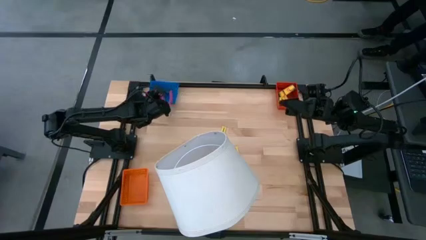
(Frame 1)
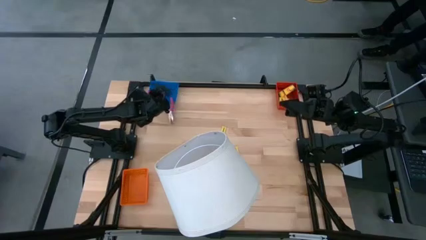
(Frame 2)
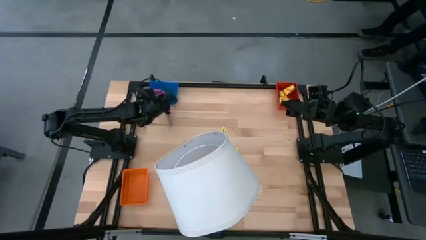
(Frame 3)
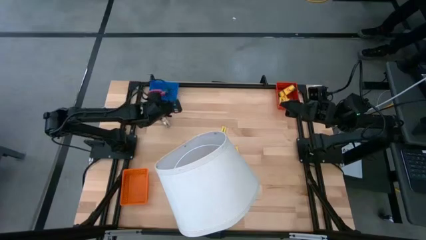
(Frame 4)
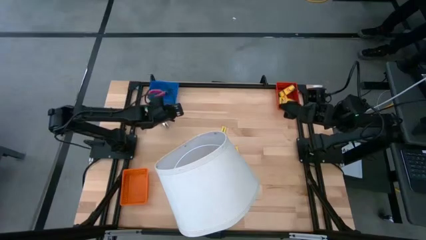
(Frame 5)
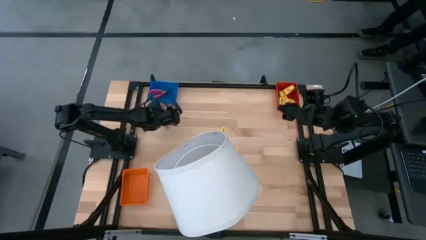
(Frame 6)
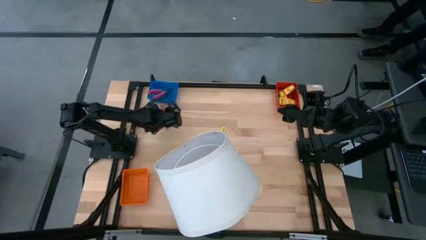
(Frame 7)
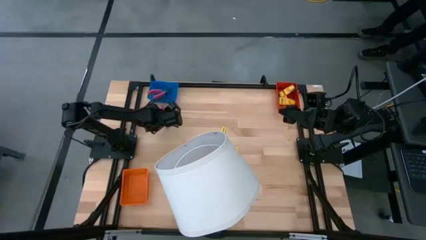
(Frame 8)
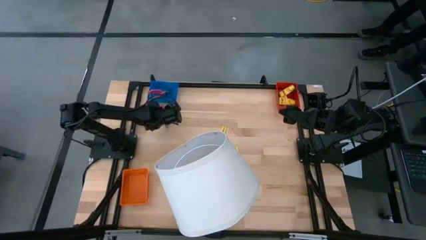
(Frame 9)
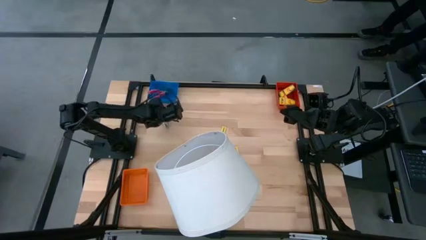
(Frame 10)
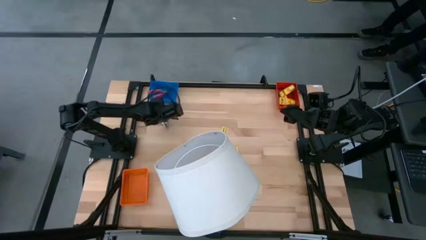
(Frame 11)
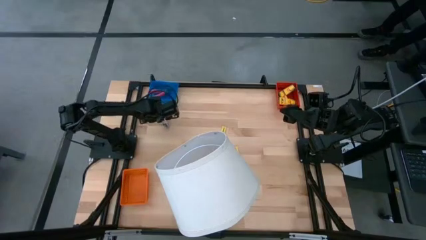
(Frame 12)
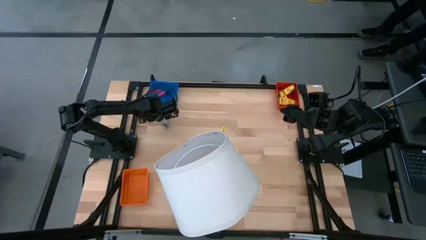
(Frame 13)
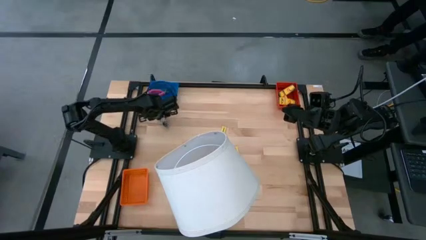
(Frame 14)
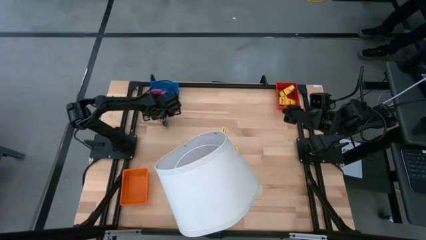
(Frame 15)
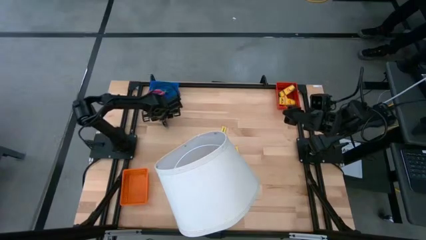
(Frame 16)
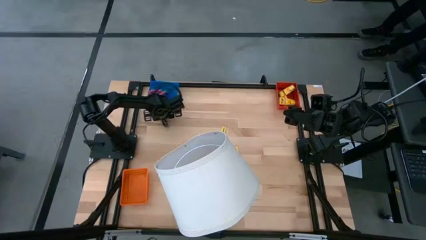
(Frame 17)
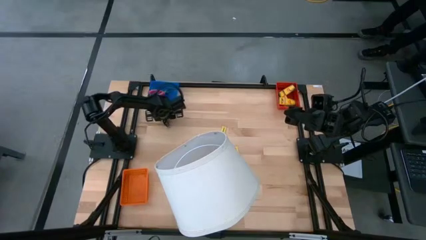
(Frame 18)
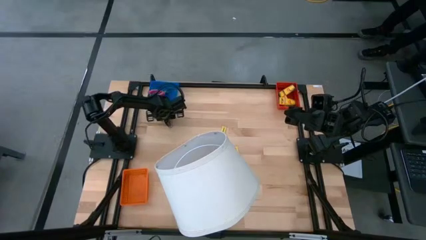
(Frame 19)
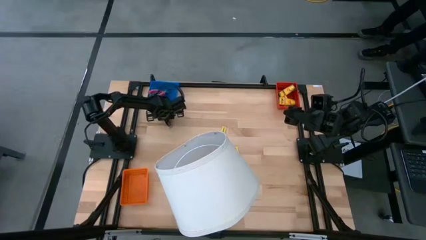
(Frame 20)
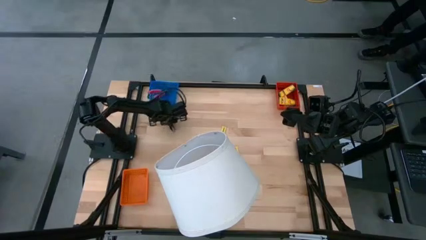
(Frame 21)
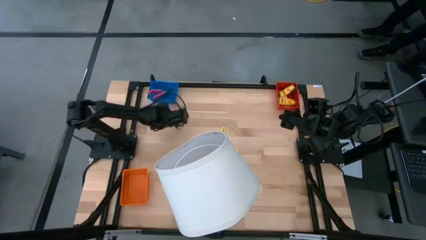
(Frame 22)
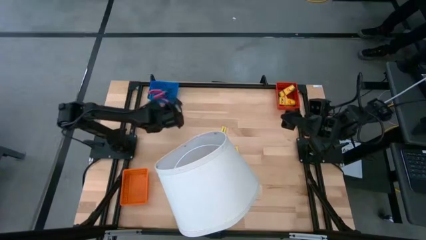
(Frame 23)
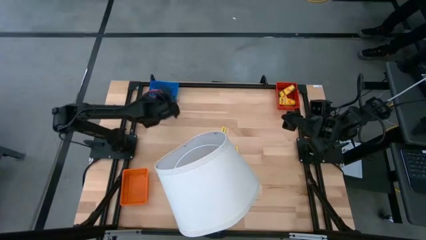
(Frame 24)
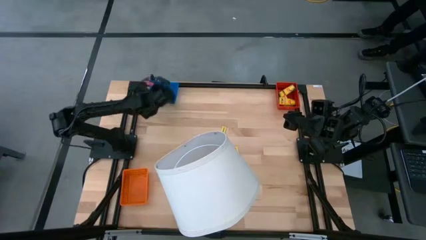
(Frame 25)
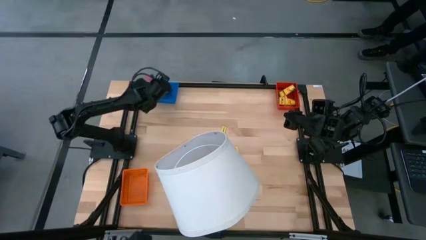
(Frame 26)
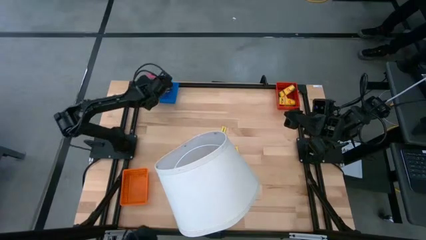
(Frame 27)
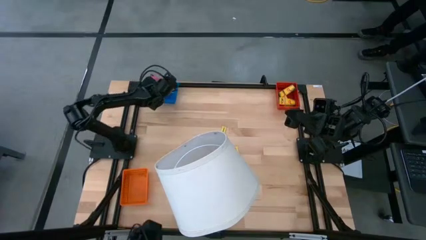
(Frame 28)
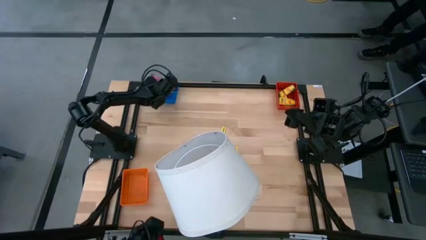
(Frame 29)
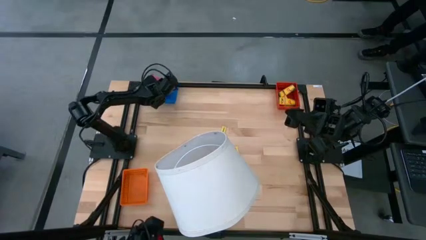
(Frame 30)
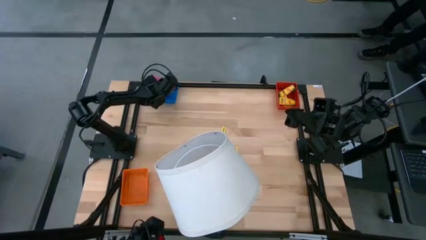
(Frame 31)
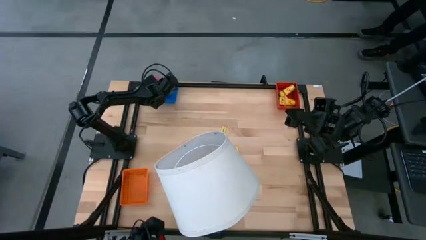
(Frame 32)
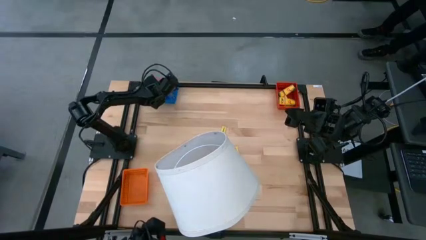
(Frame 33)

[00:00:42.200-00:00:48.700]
Task: Pick & Place School Supplies
Put the pink hole puncher into the blue basket

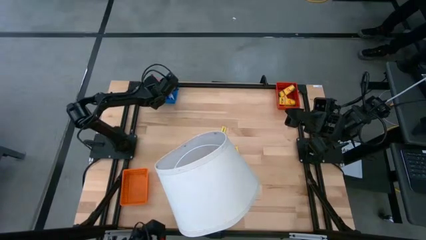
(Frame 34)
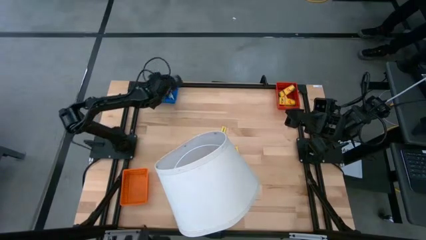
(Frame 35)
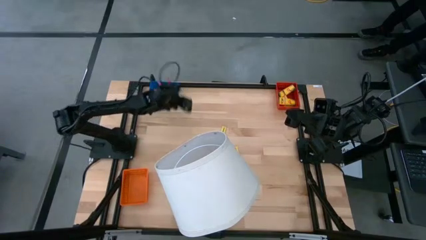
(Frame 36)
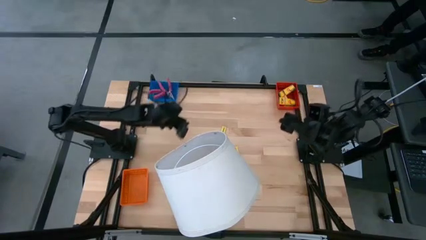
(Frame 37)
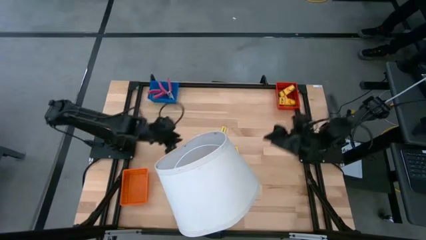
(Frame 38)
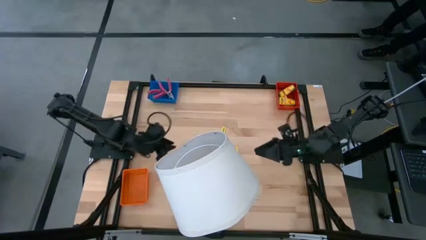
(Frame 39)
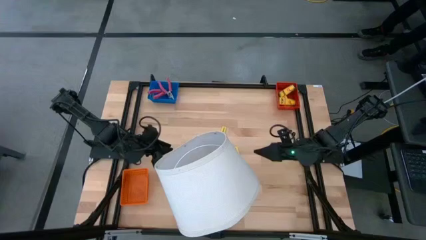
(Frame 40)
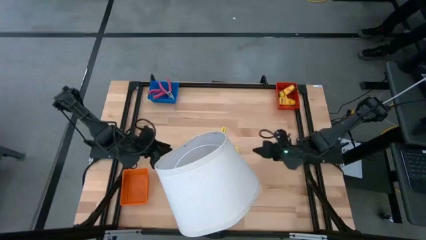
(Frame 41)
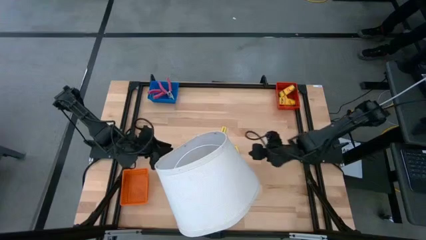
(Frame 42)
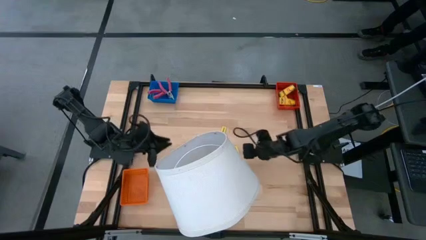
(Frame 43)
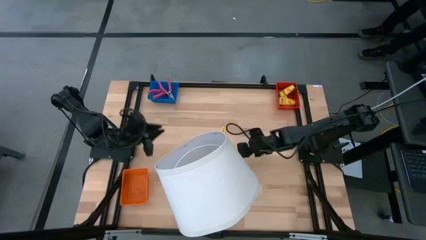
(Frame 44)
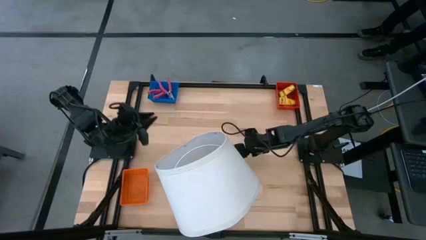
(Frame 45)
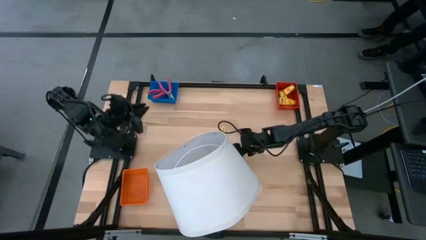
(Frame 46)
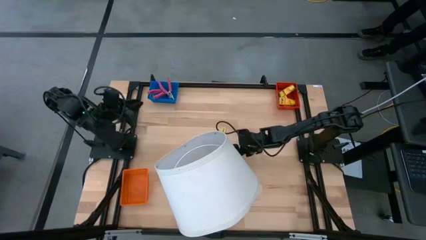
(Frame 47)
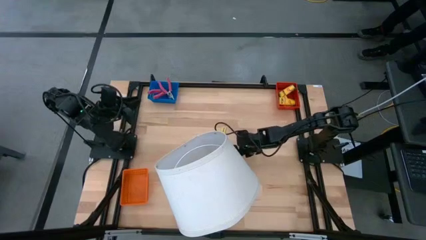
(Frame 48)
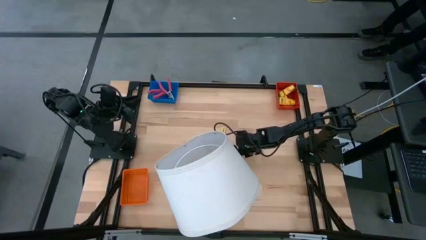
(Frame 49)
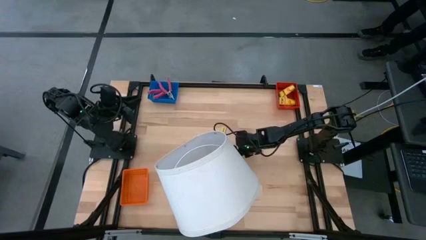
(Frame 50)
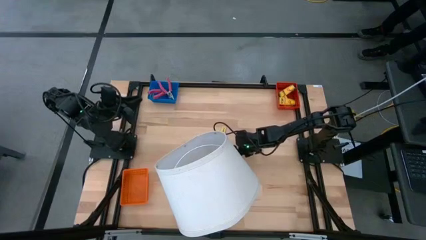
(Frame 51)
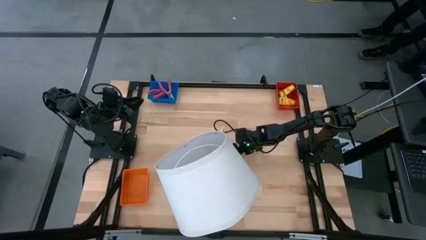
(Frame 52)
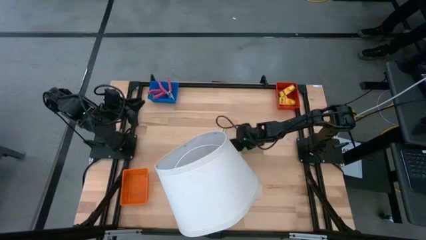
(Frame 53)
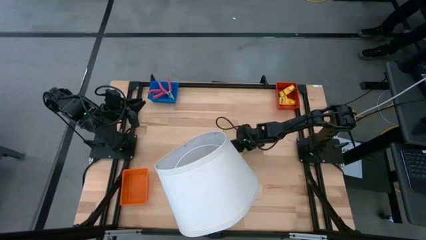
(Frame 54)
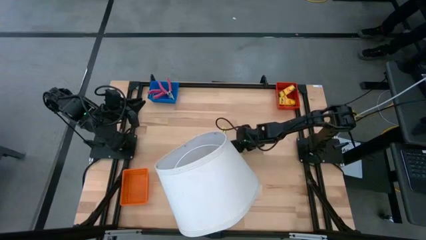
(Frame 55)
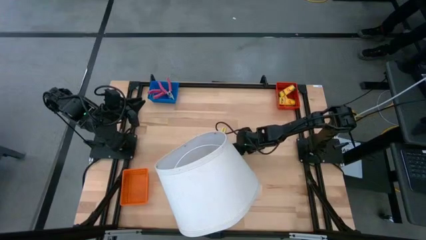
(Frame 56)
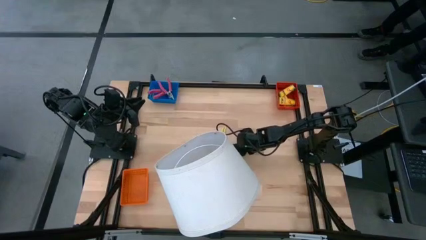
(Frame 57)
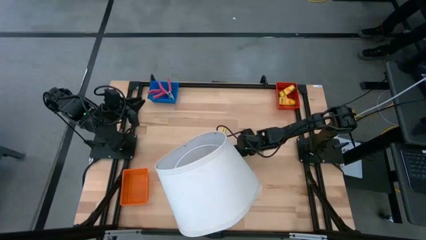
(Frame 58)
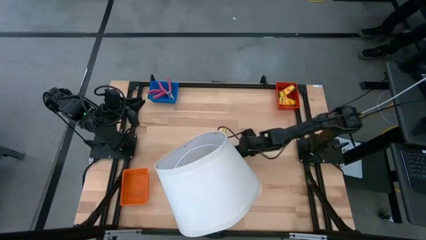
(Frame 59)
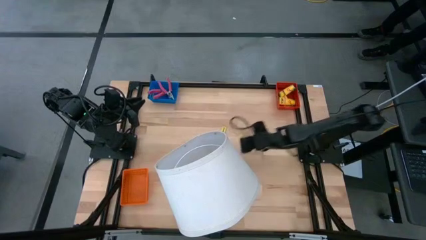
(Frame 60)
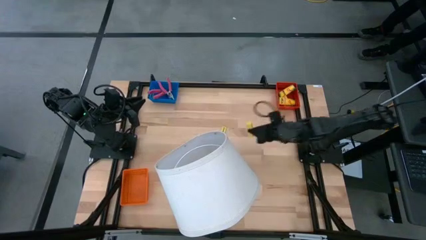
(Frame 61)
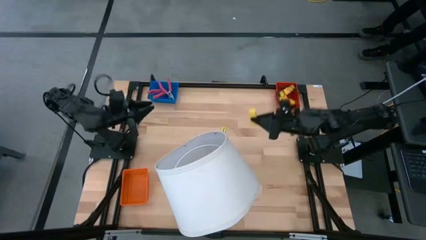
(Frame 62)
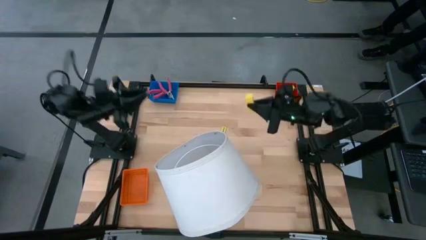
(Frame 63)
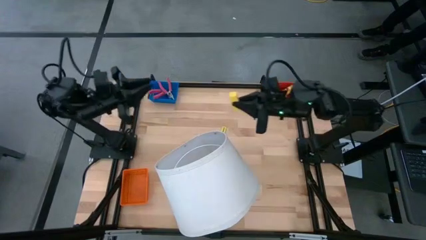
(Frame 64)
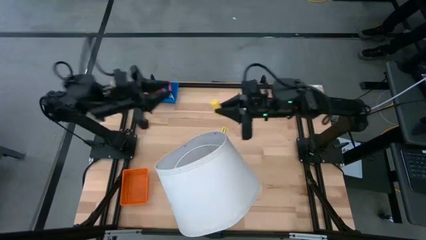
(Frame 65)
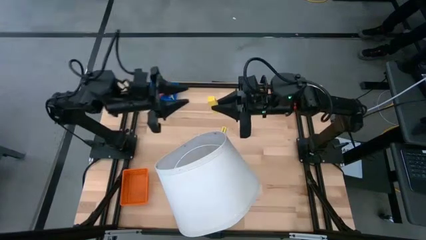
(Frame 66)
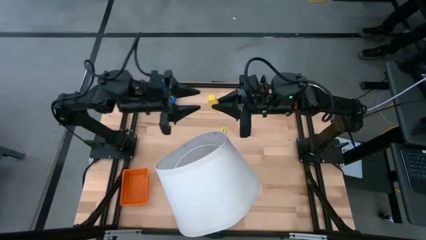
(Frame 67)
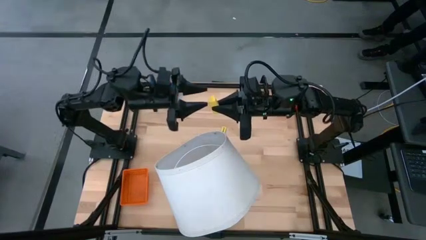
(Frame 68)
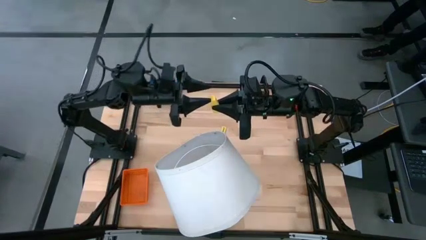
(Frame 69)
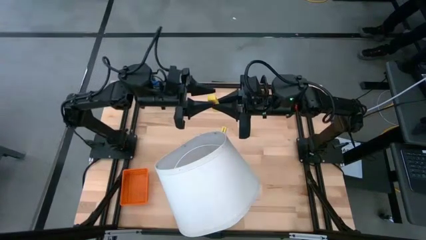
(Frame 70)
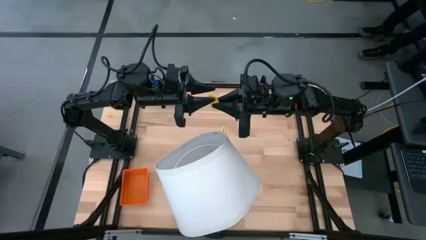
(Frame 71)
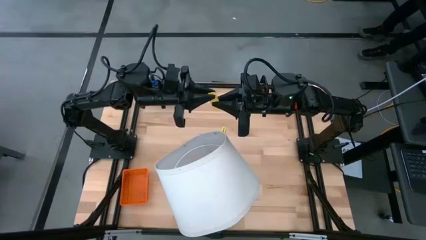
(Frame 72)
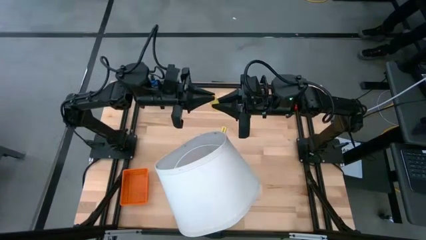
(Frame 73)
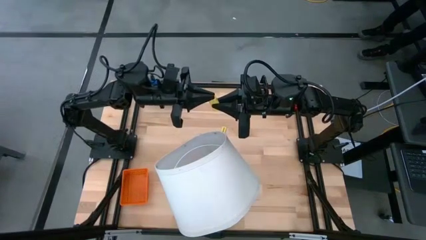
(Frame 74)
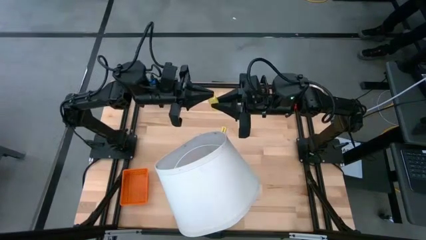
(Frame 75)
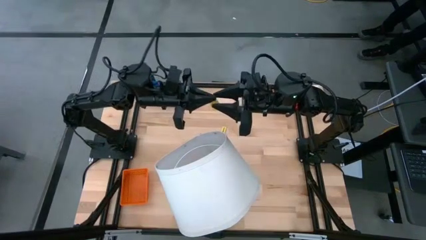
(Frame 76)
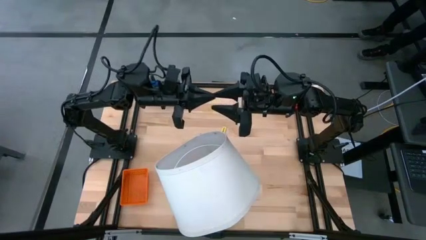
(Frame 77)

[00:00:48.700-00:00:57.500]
Put the yellow eraser into the orange basket
